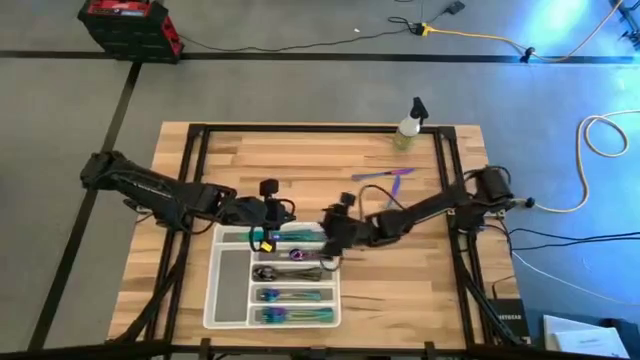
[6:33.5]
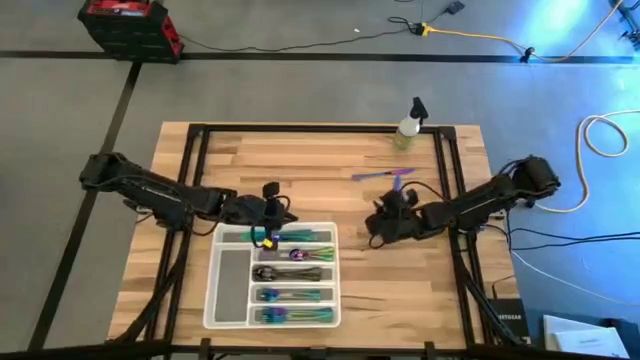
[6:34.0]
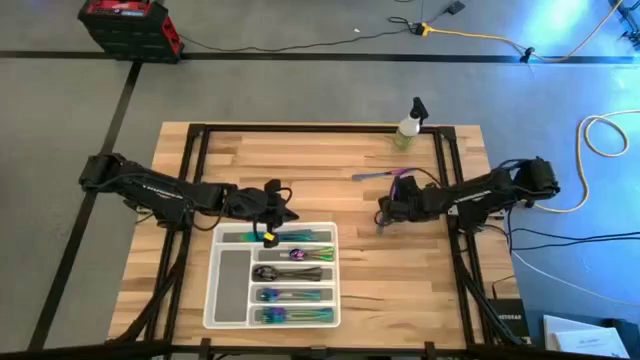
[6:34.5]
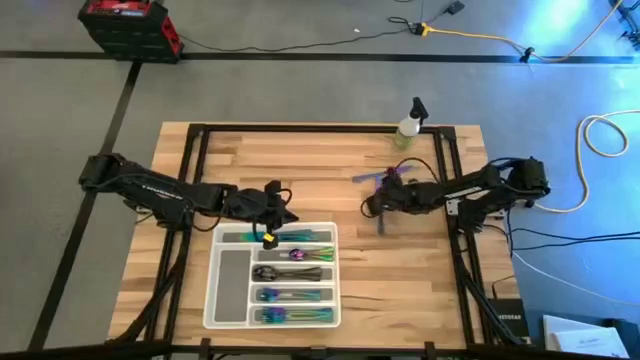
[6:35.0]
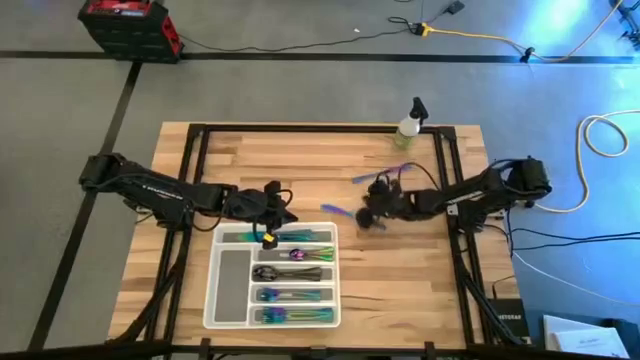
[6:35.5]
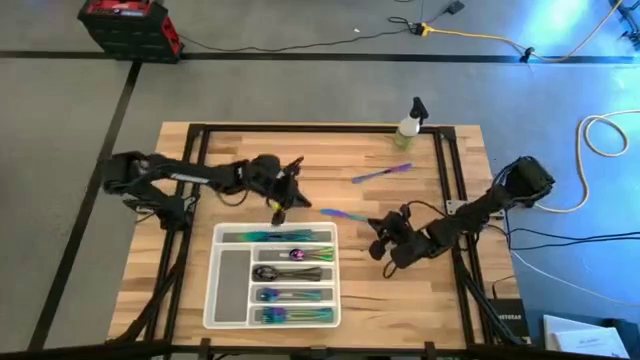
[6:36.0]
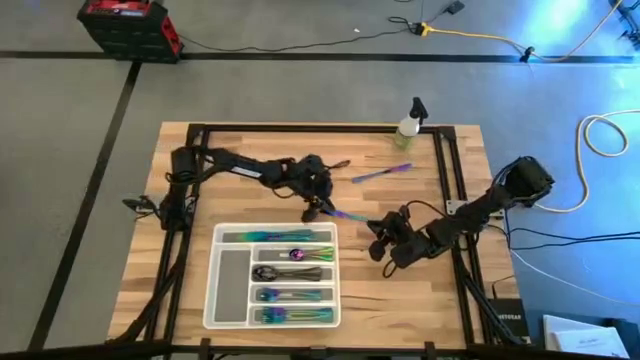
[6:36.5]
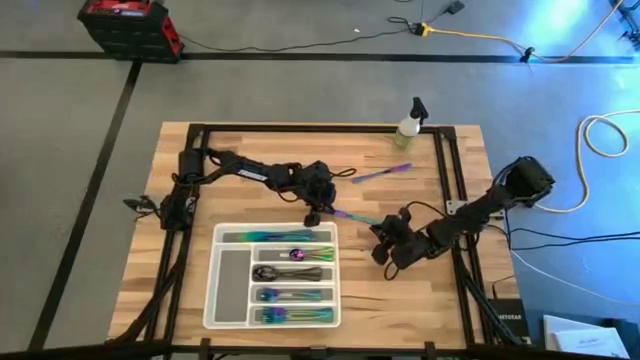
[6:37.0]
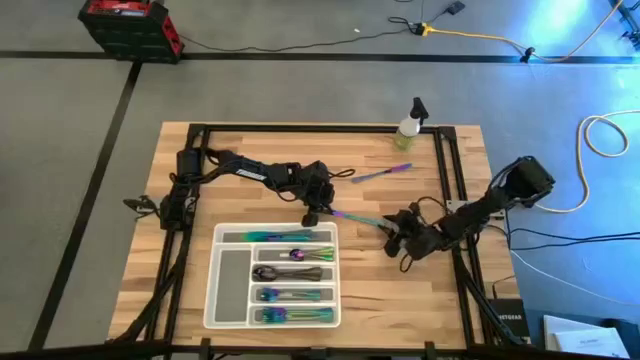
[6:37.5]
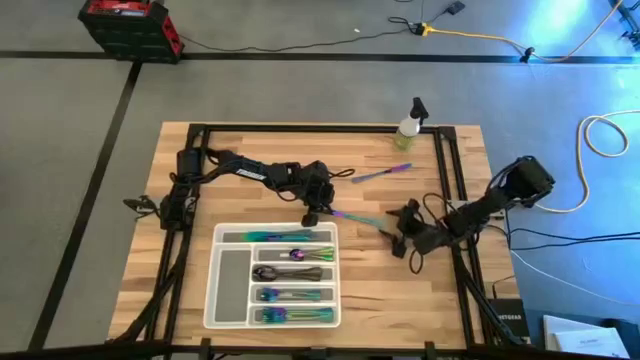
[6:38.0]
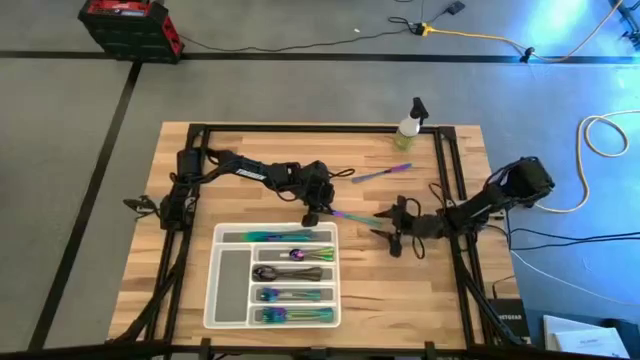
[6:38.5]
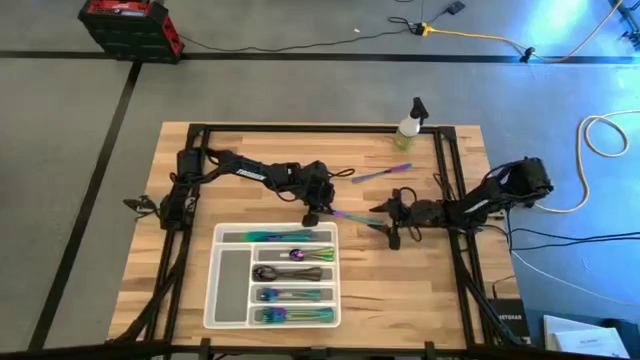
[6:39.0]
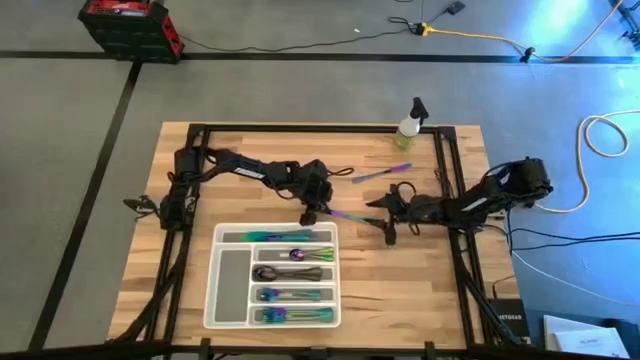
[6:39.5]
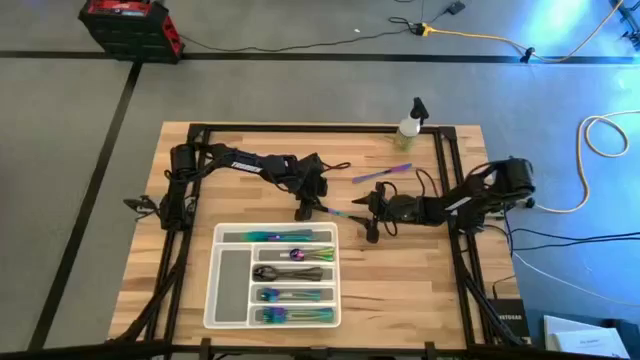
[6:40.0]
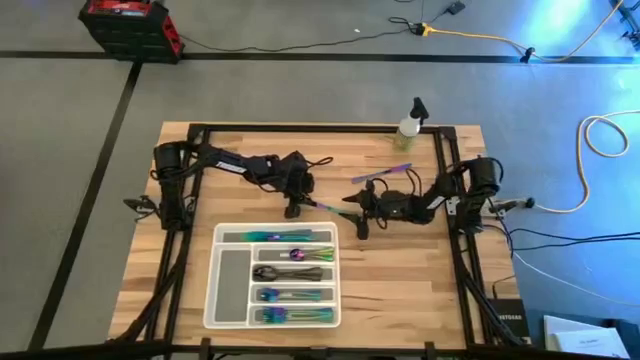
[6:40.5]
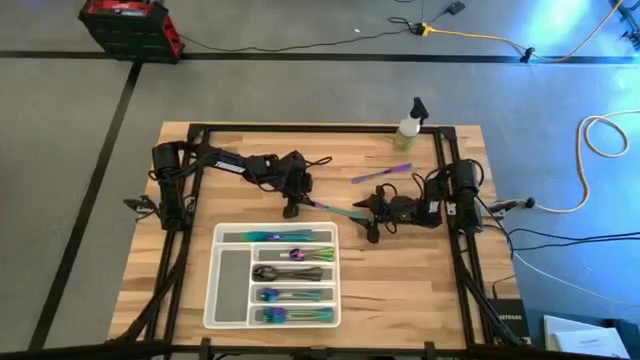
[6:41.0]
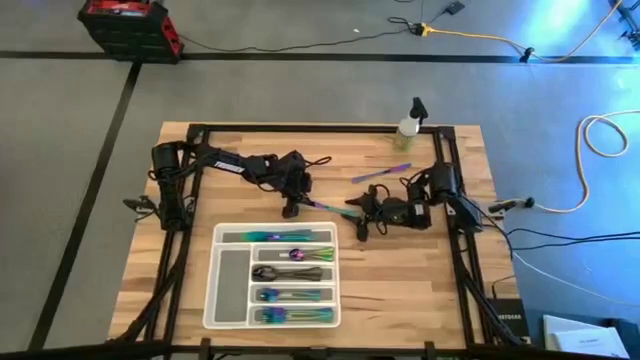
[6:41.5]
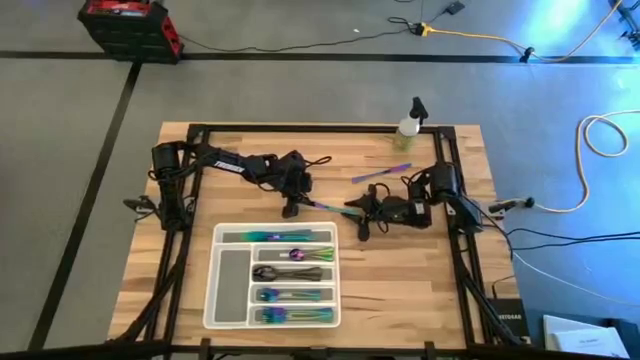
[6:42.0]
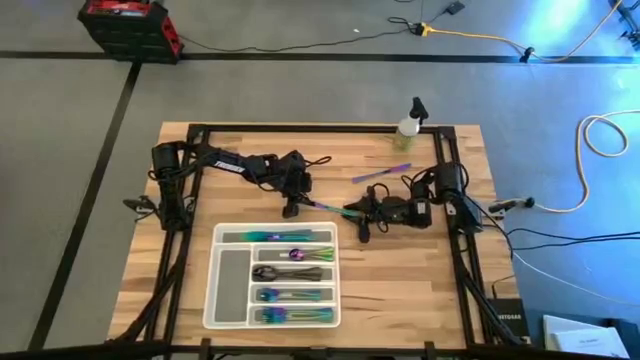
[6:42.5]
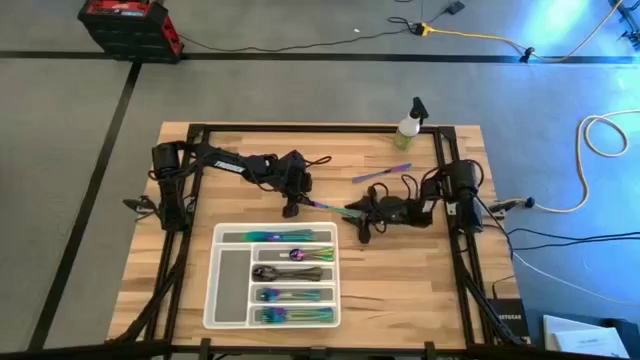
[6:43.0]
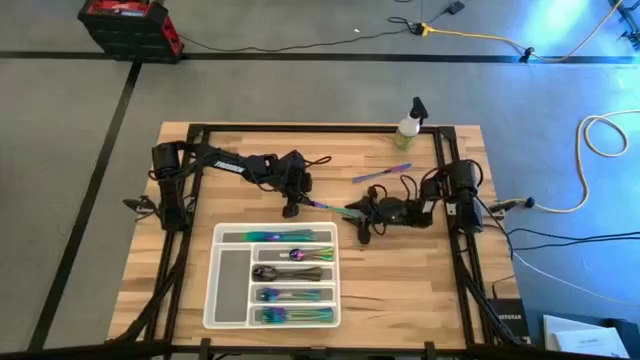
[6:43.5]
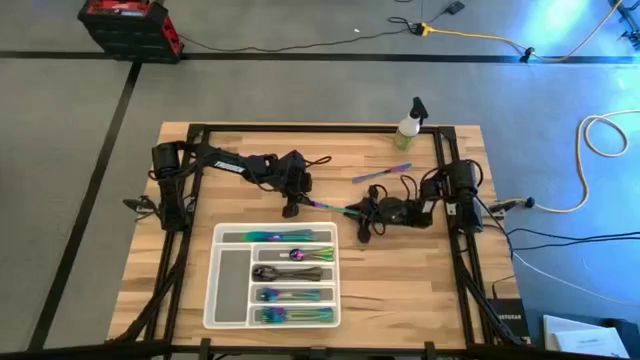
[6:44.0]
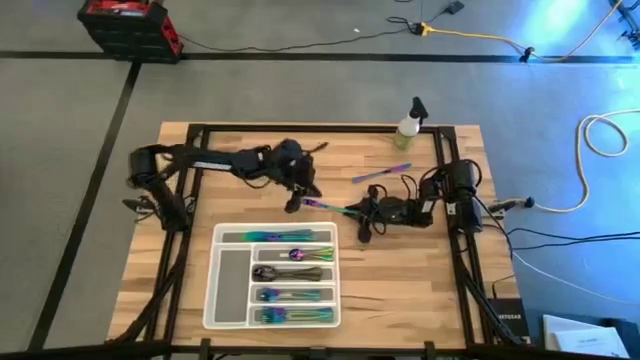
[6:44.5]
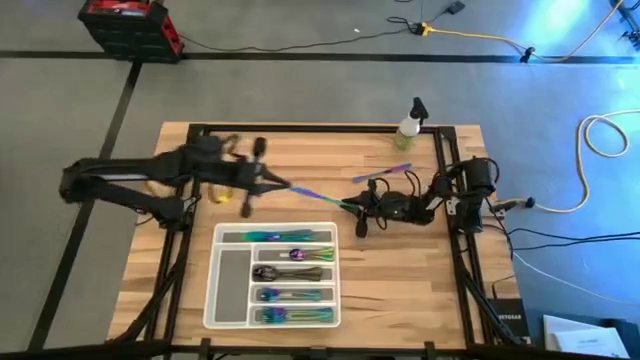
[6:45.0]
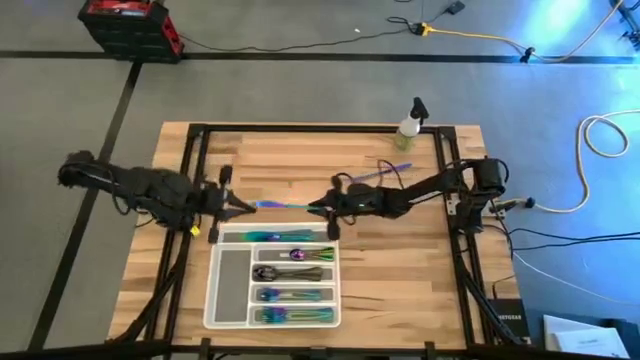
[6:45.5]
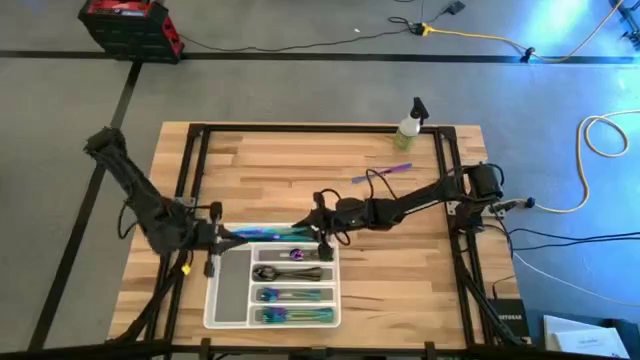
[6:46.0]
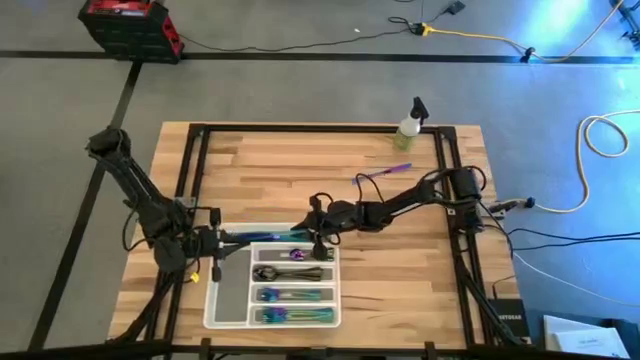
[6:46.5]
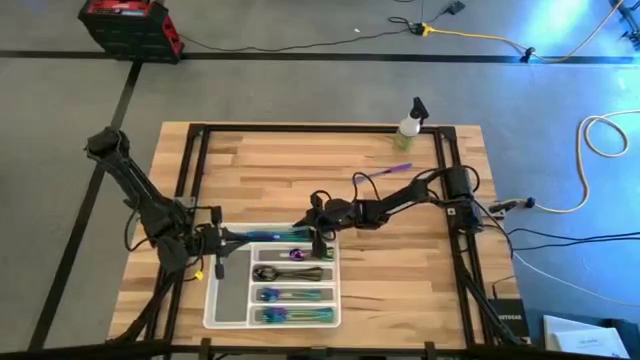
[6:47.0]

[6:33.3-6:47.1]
Task: Sort silverware
Put the blue table knife into the white silverware tray

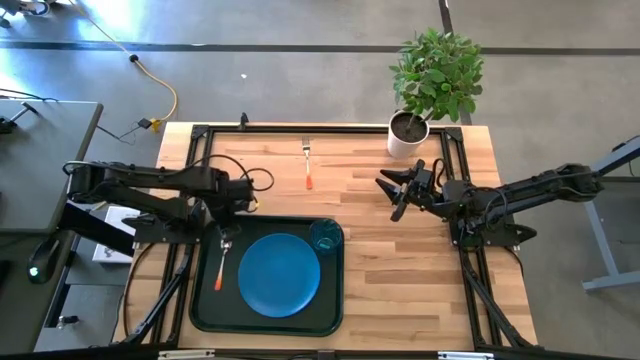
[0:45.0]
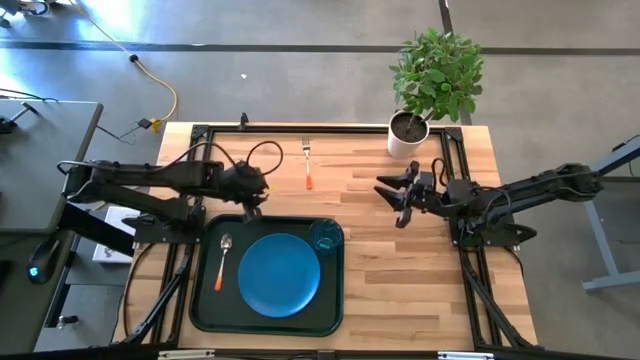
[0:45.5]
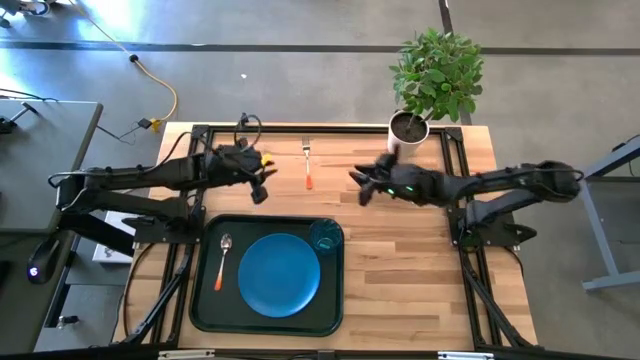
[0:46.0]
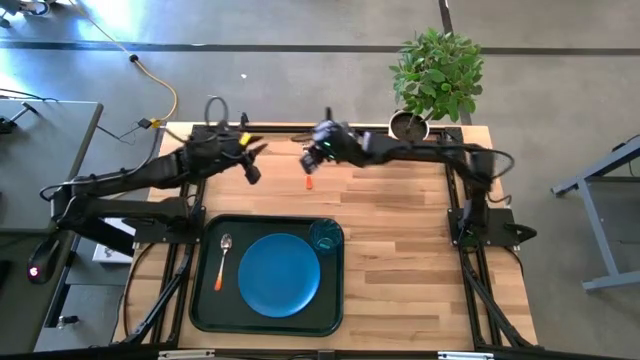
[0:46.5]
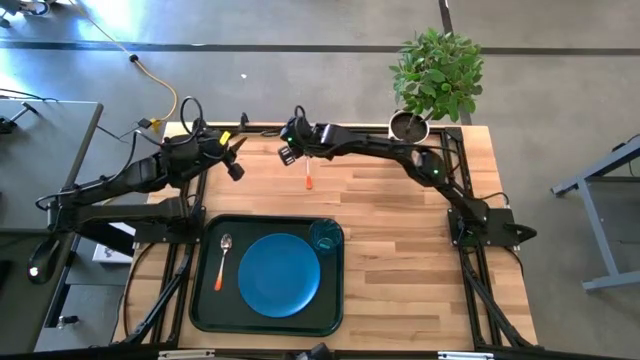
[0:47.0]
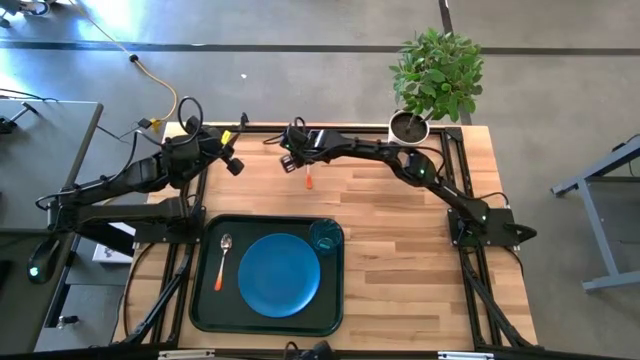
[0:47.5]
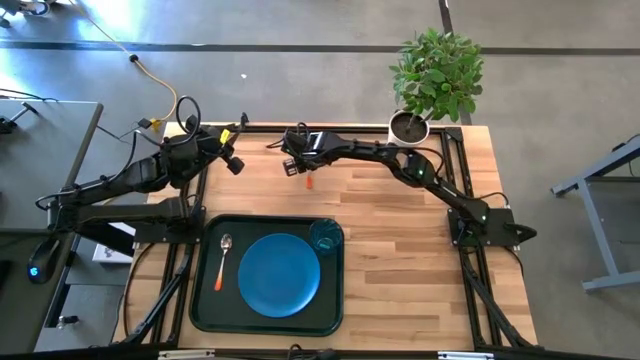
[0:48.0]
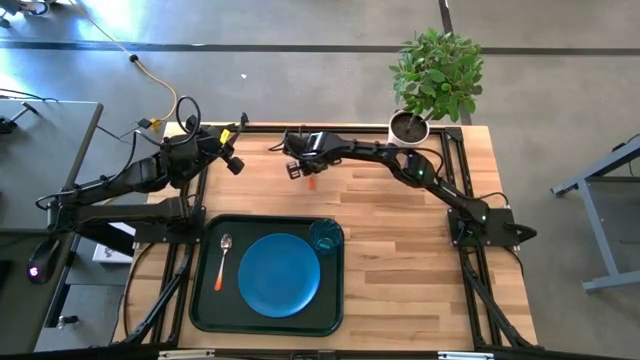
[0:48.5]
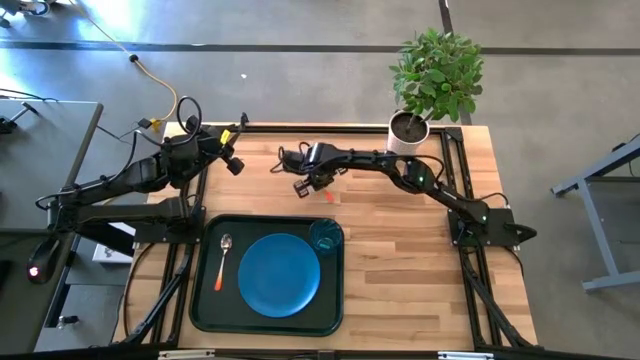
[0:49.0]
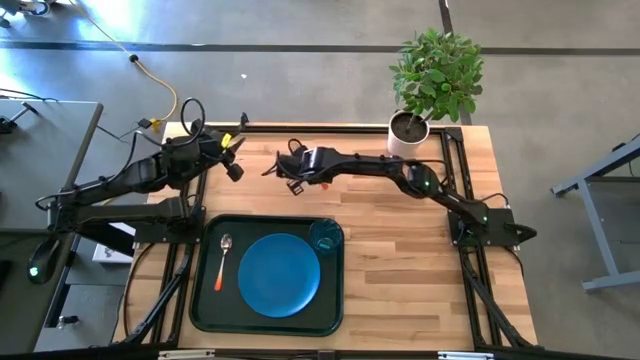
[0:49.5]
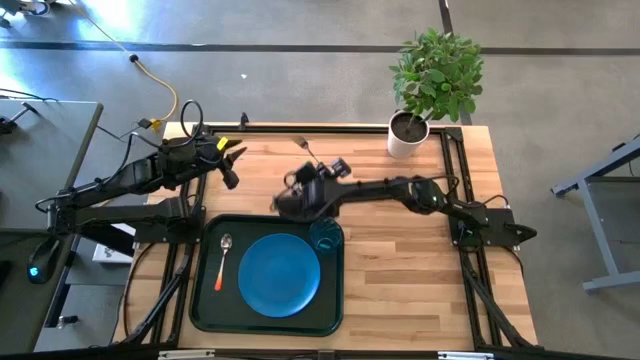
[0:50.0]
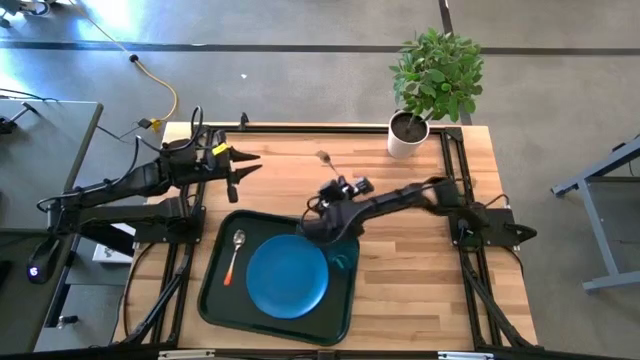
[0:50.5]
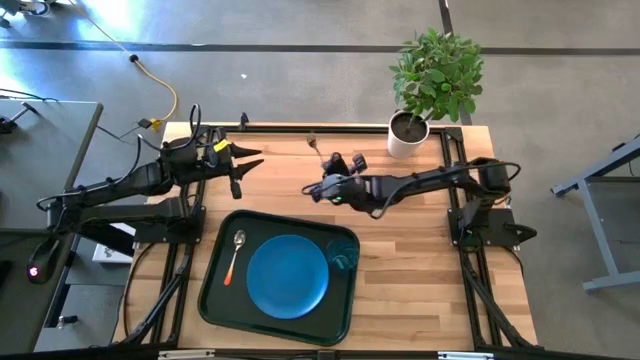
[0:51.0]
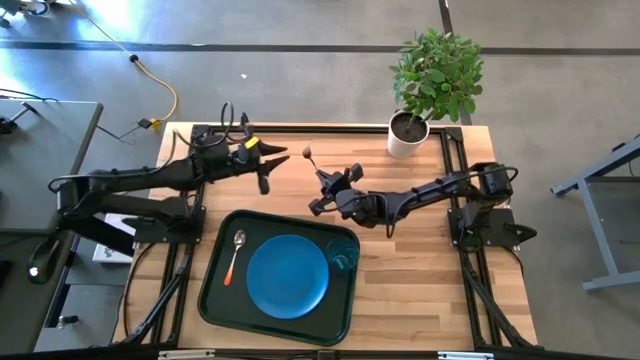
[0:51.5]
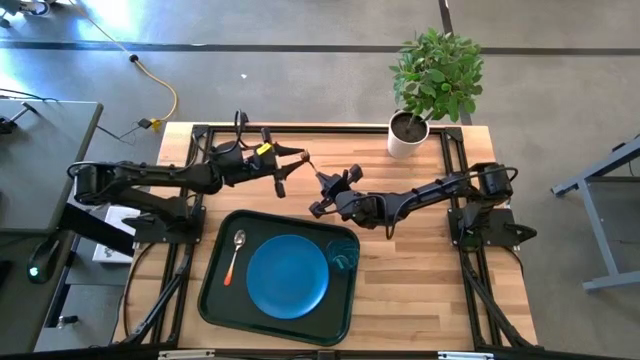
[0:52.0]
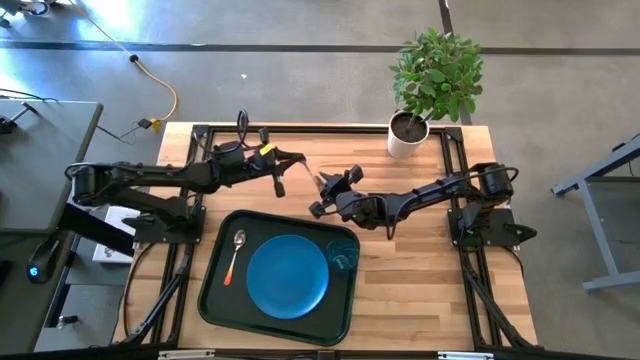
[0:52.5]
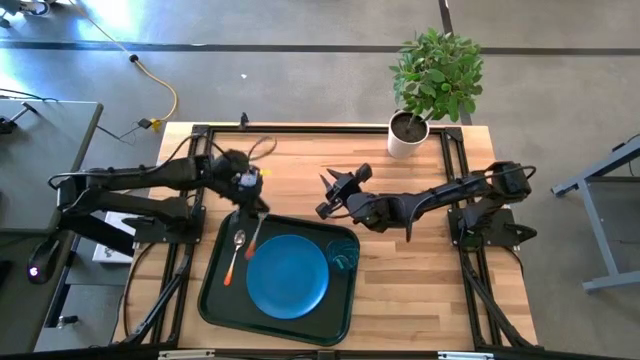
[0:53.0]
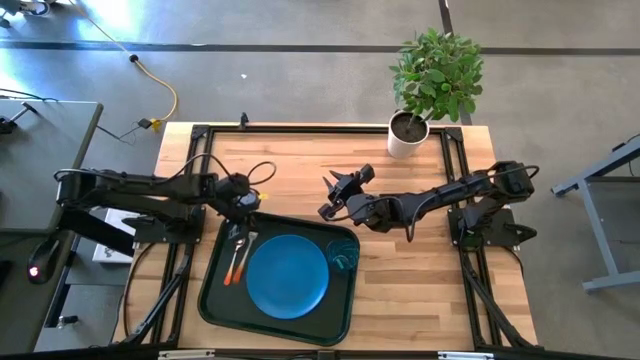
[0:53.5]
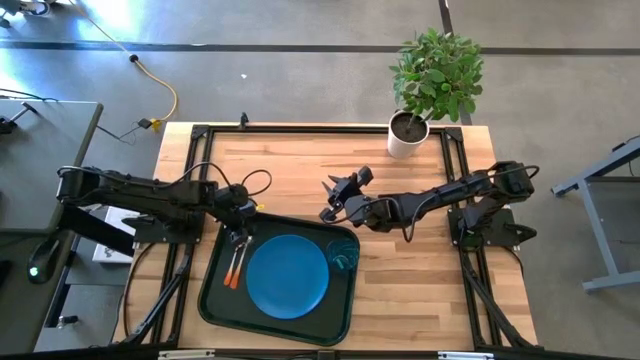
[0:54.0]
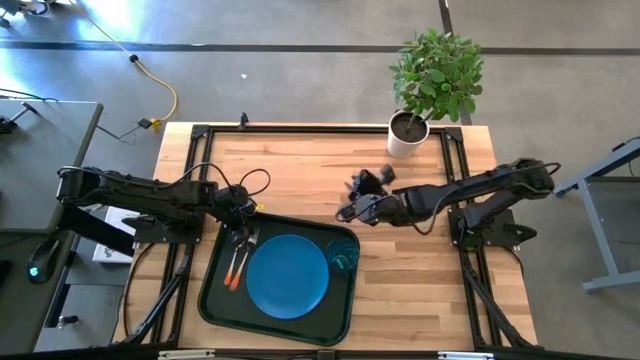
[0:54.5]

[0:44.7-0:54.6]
Task: Pick and place plate/cup/fork/spoon on tray
Put the orange fork on the black tray to the left of the blue plate
